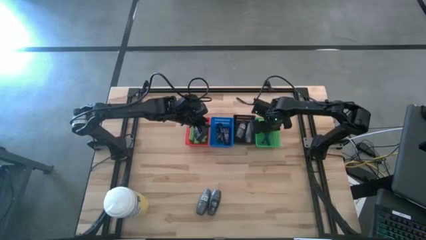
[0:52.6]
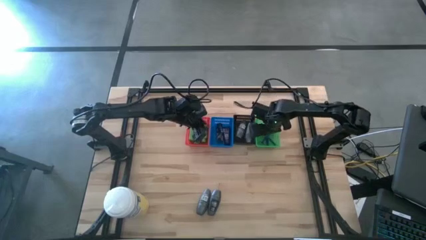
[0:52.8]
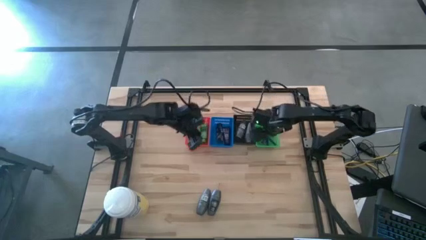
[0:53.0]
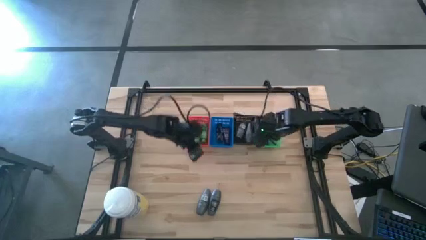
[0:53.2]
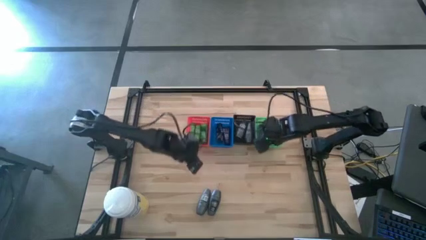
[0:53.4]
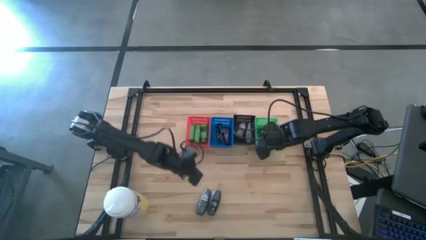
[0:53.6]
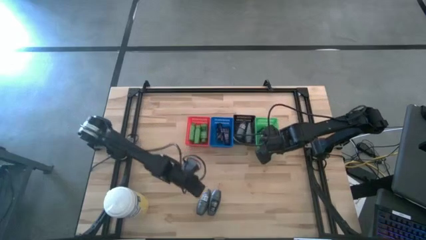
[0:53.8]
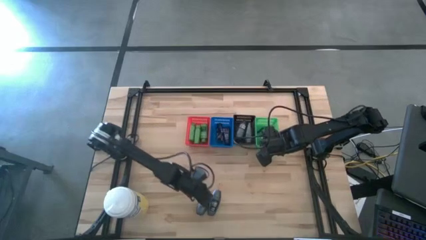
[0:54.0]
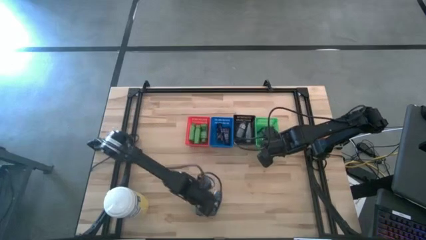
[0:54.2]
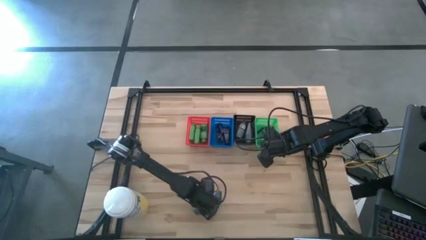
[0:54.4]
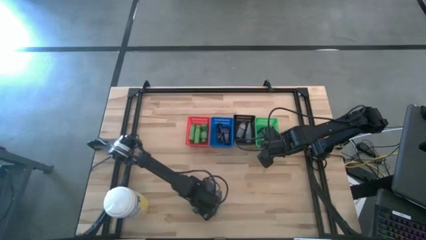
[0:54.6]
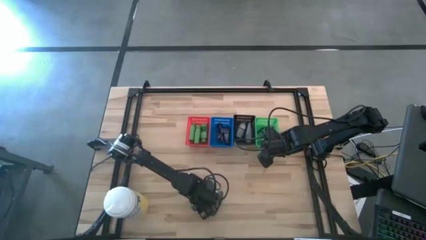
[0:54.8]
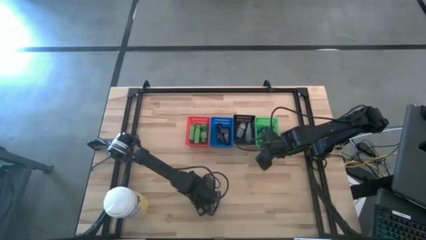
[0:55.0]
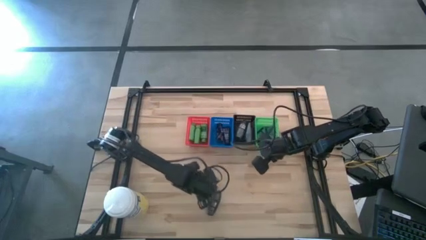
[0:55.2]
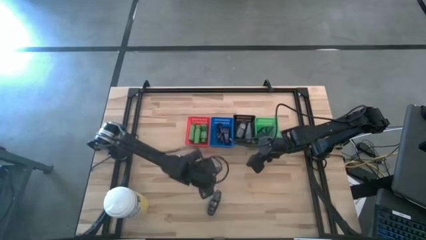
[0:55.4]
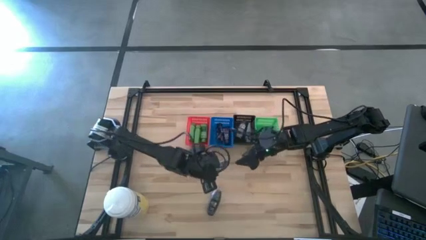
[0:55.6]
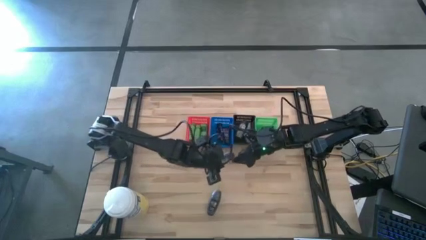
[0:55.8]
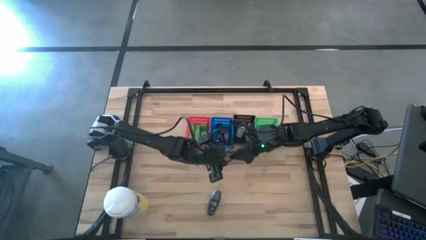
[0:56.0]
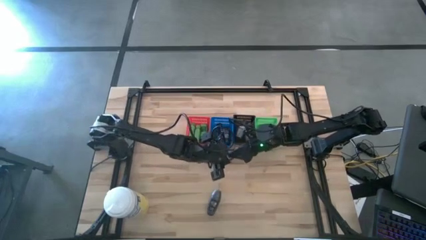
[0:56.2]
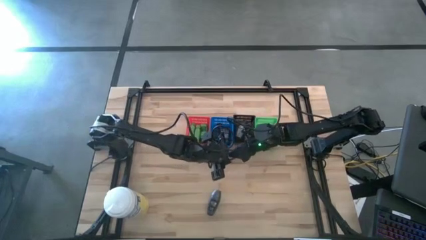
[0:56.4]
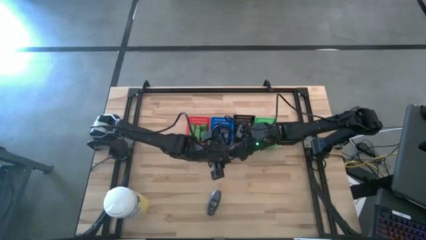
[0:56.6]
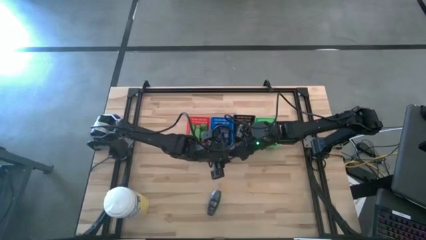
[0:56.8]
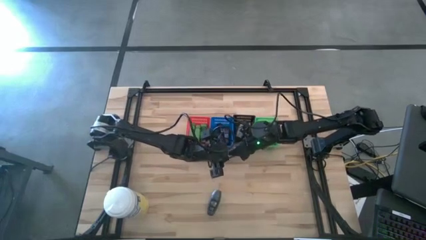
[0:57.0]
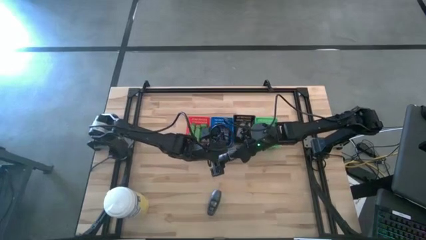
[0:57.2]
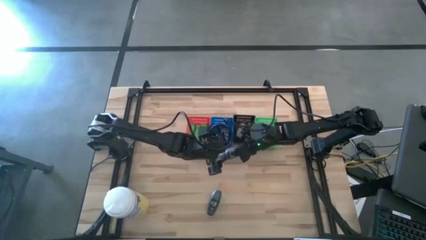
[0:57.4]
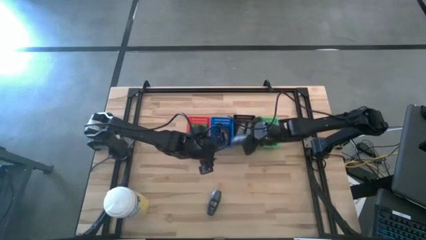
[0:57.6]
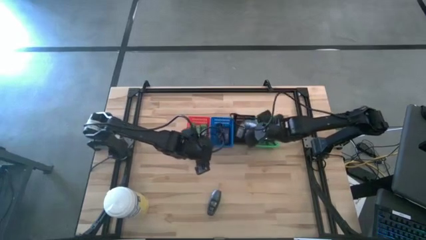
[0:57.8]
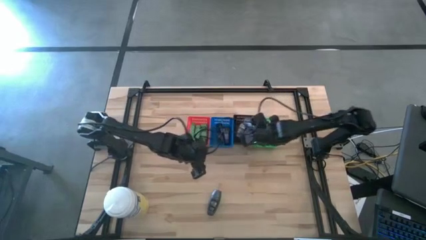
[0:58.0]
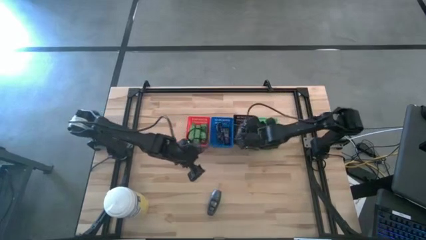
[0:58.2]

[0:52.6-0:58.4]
Task: Pick & Place Travel size toiletries
Put the gray deodorant into the black bin

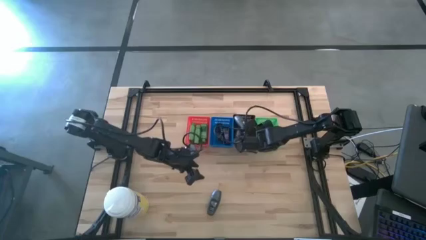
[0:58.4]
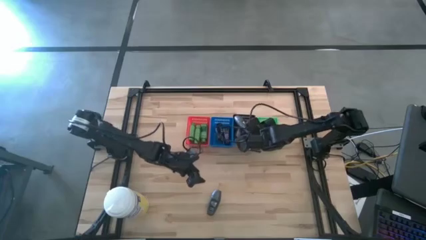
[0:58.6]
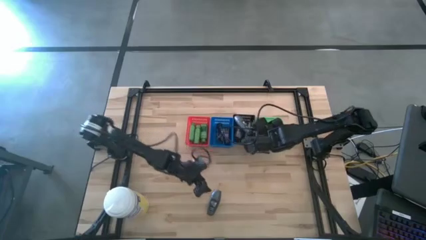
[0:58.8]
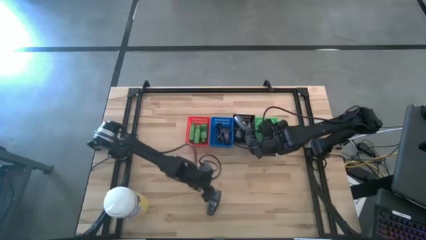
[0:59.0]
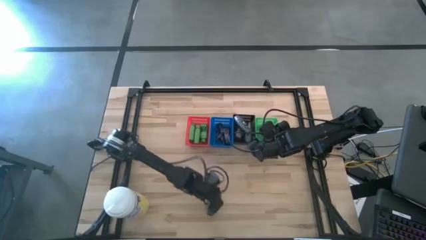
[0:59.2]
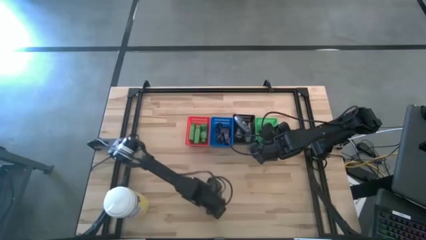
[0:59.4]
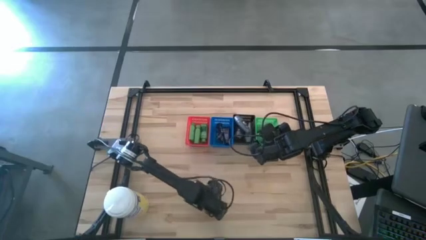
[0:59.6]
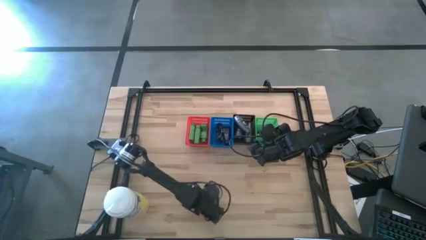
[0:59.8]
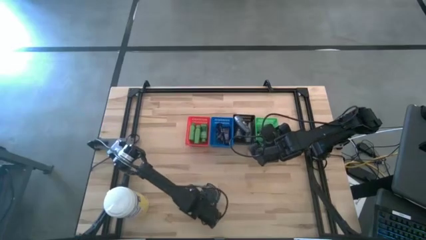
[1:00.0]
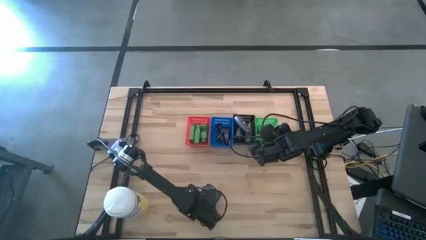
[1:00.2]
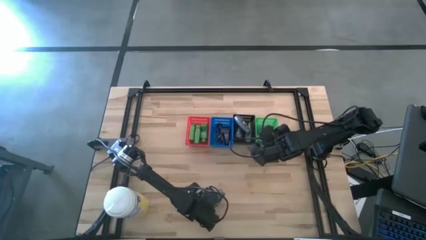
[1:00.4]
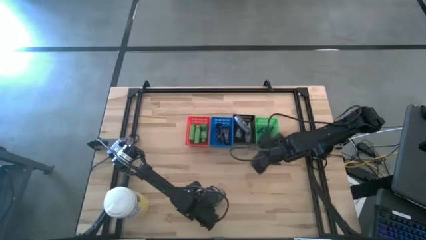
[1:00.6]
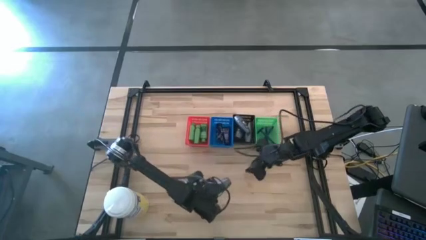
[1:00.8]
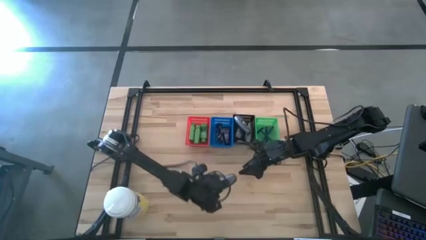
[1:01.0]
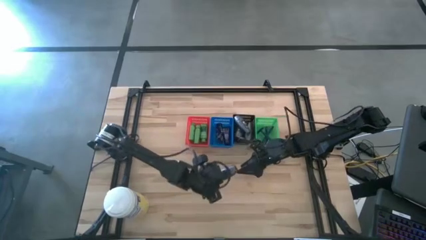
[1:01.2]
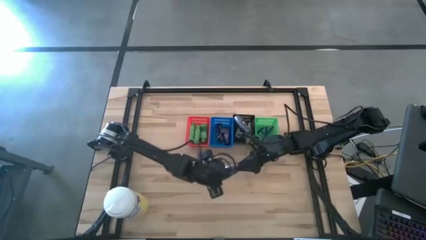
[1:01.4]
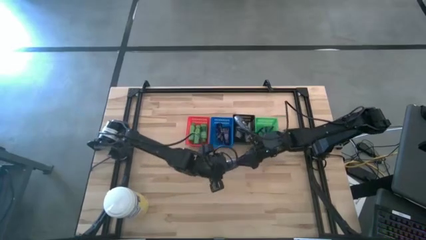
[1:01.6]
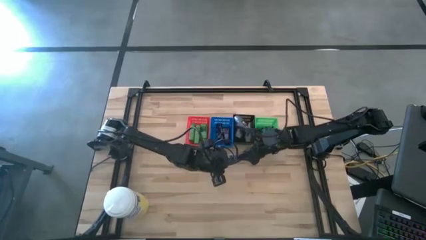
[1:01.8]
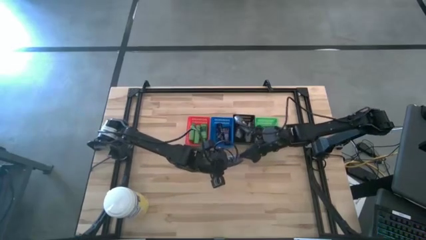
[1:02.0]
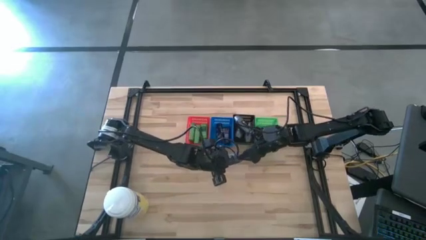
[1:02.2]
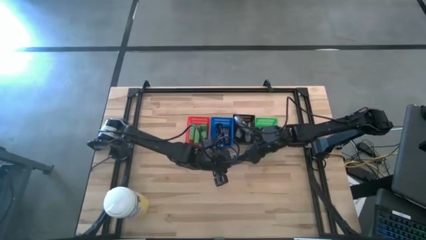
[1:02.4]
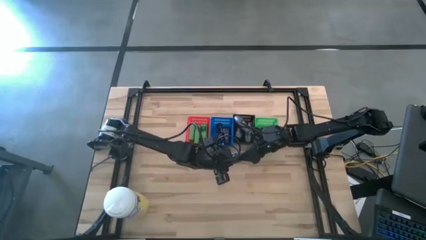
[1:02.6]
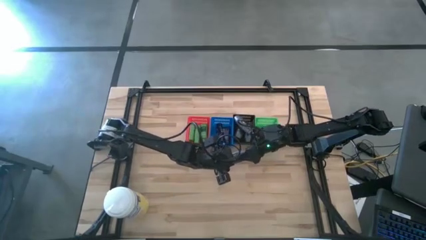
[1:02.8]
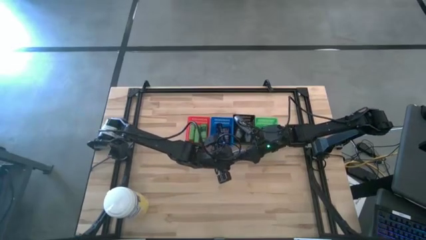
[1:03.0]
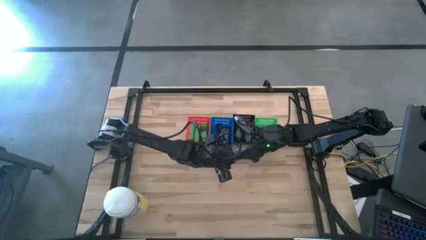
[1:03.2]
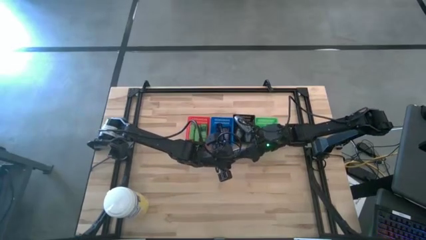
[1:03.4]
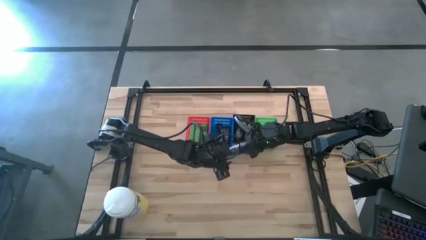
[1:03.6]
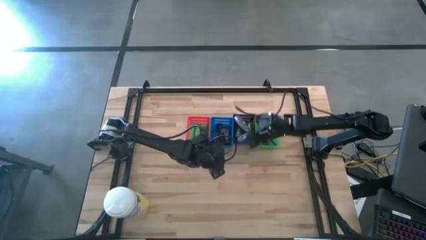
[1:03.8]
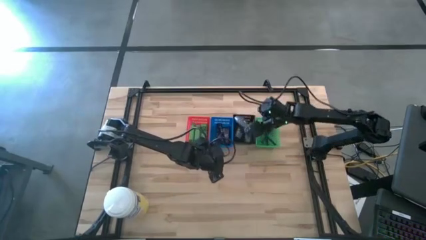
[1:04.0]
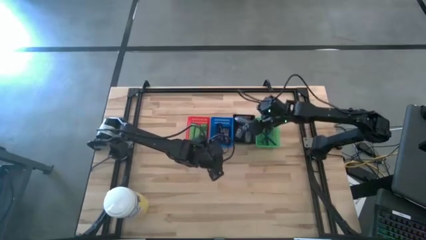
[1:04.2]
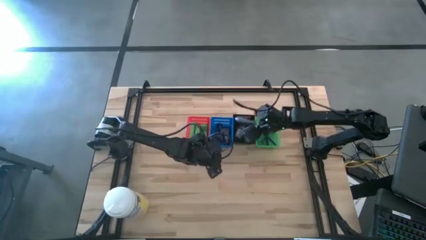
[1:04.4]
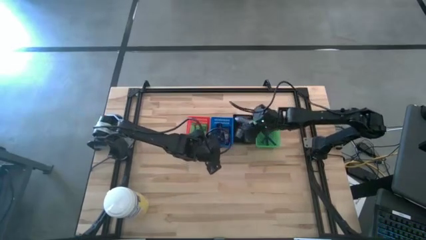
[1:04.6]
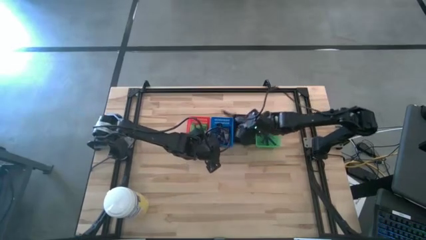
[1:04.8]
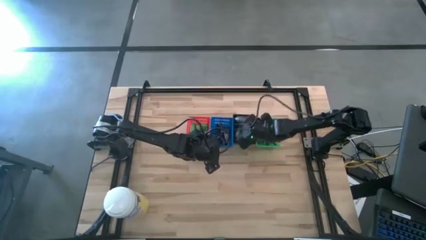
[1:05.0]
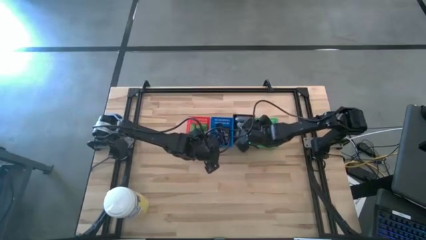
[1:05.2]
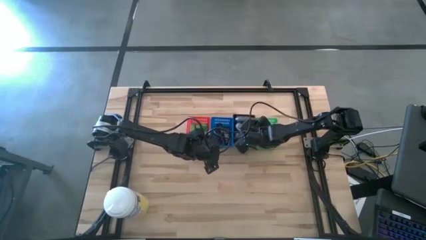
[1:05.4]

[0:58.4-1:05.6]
Put the gray deodorant into the black bin

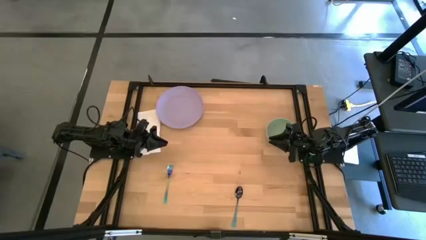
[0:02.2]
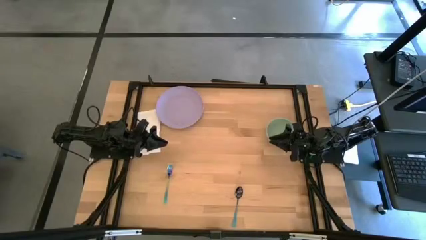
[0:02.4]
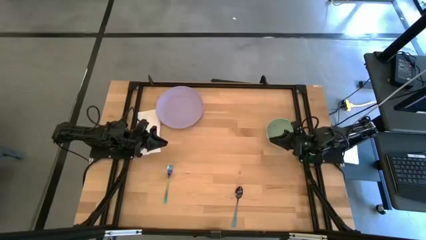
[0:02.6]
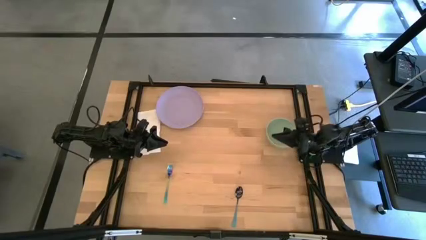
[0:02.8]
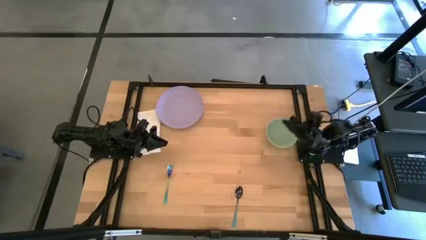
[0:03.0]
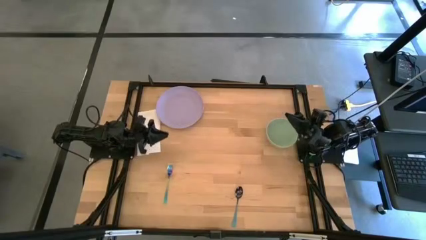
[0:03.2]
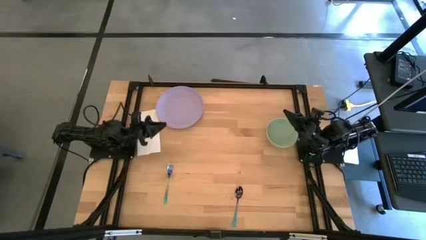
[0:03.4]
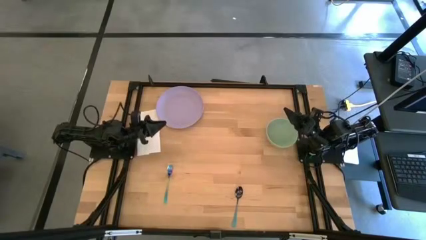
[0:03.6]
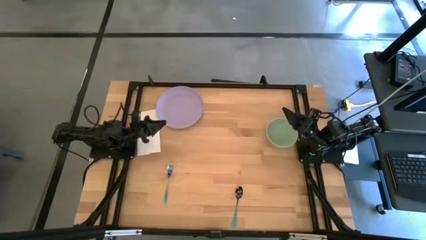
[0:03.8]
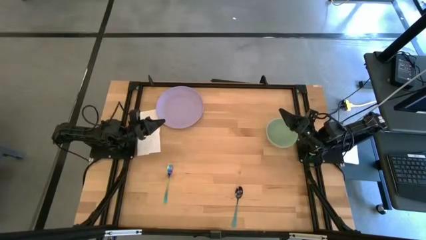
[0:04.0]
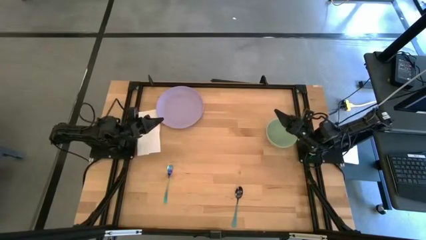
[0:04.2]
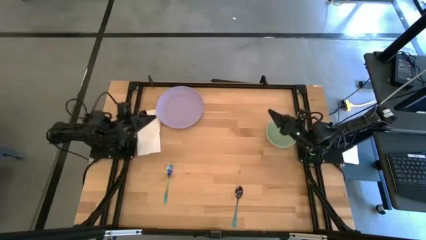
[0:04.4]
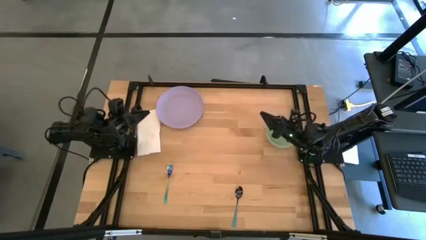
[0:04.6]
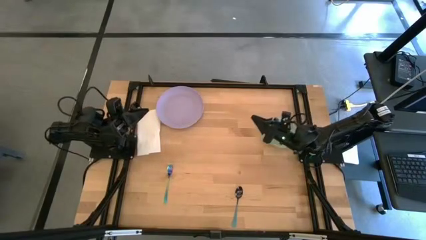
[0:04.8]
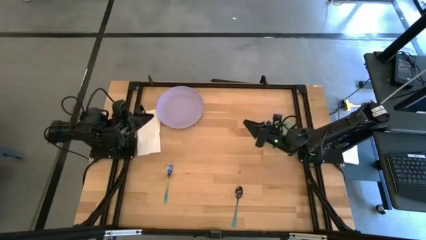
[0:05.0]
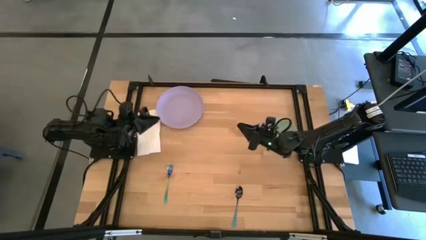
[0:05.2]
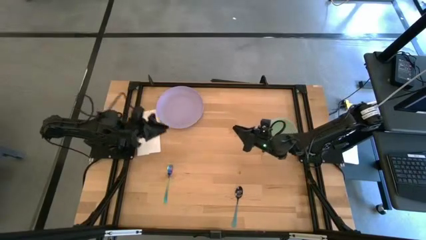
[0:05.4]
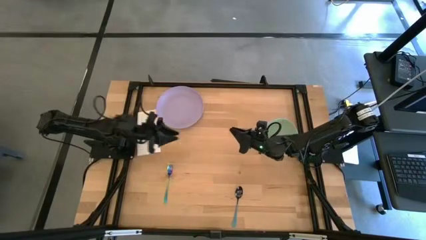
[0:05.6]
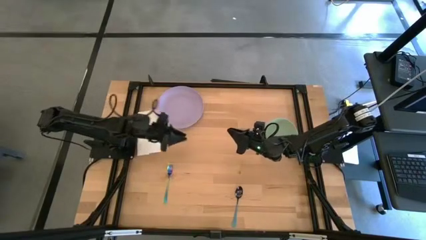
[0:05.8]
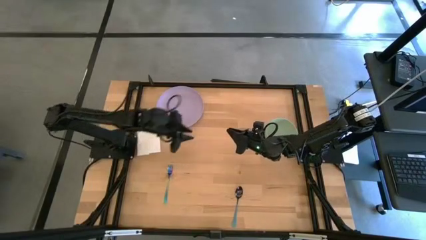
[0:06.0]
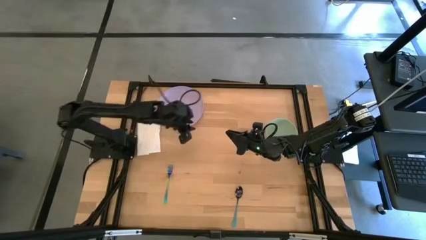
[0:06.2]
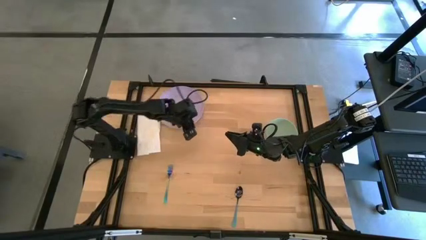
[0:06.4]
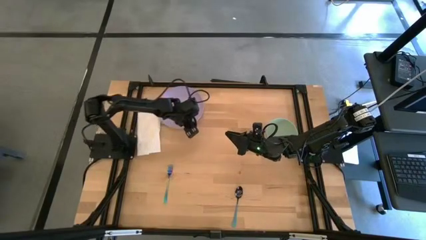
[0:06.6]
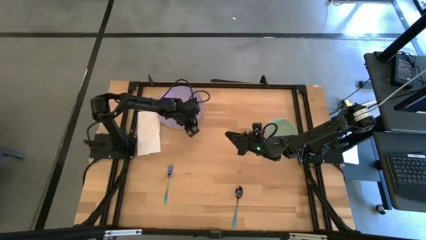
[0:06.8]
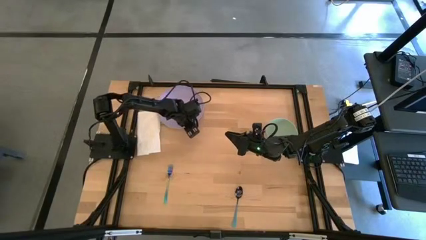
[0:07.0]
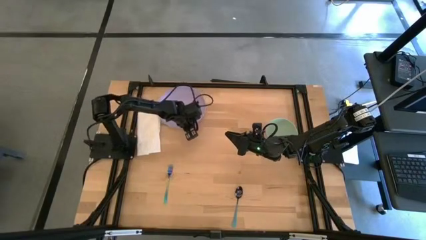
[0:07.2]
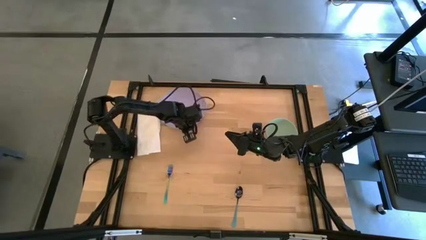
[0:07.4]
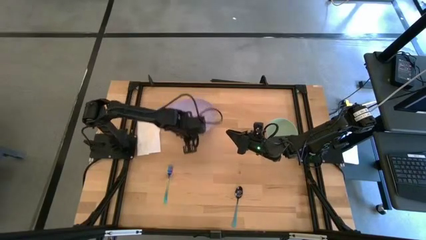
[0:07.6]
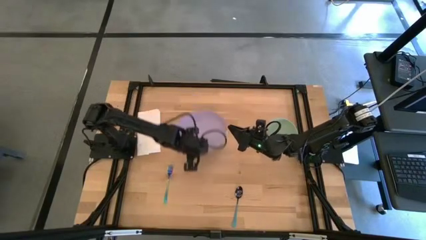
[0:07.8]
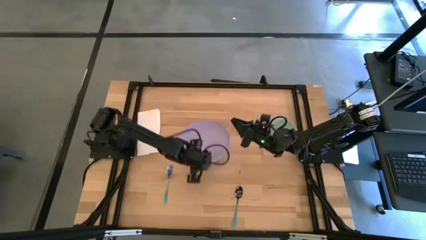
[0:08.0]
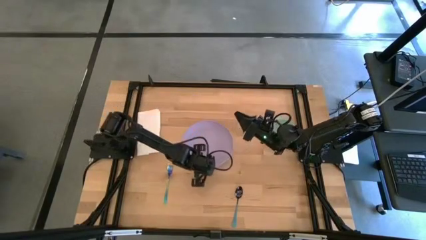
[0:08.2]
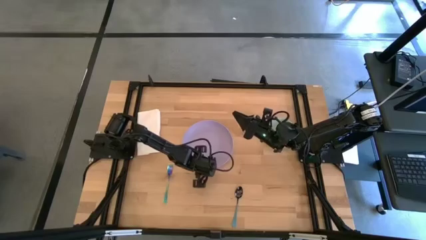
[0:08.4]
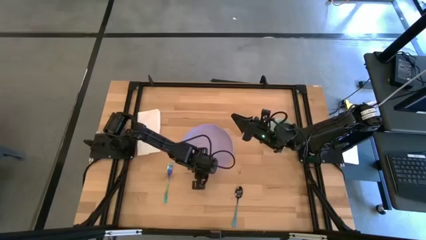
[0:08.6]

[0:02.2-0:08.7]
Task: Set table place
Move the purple plate to the center of the table
